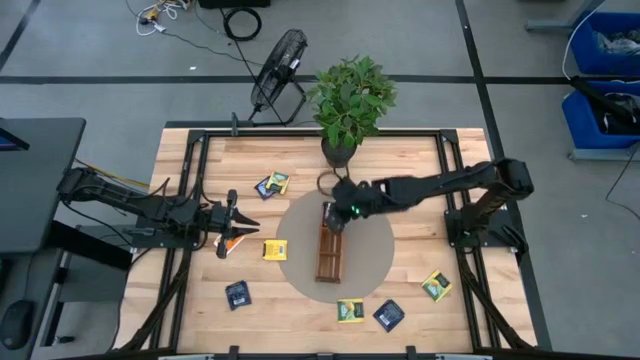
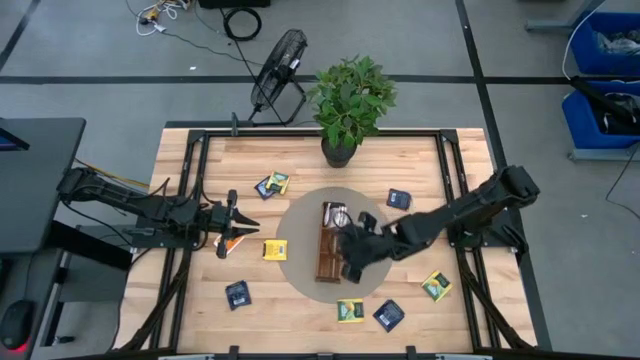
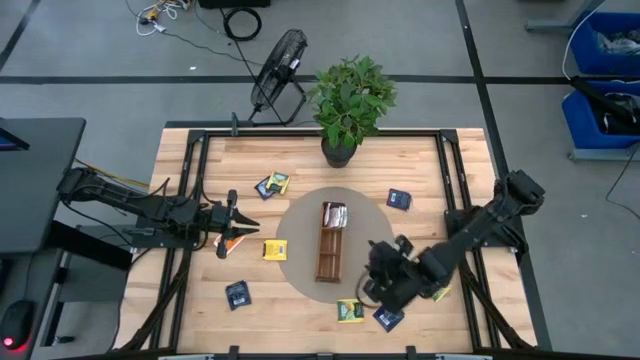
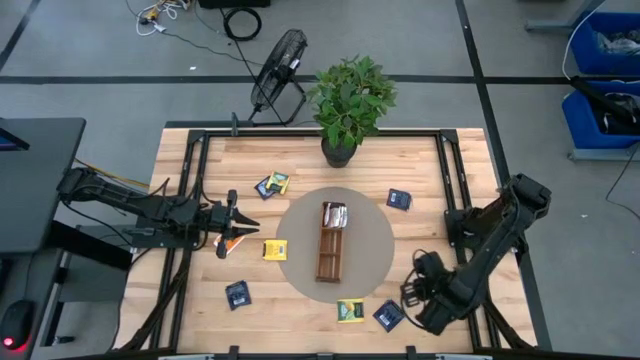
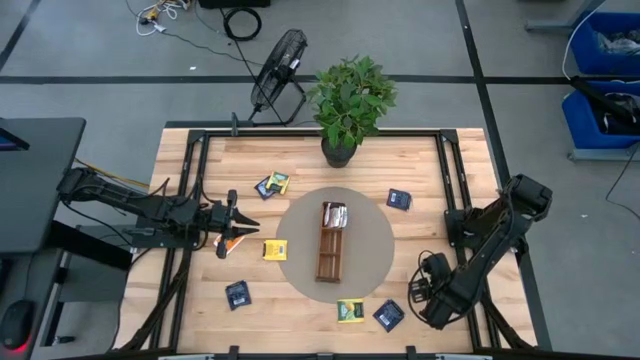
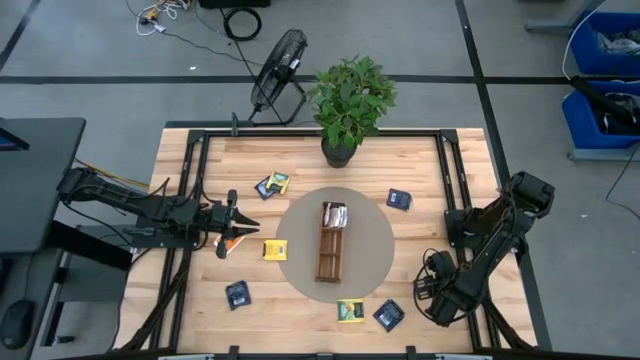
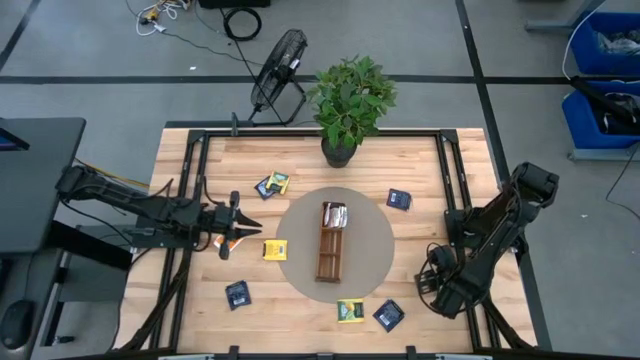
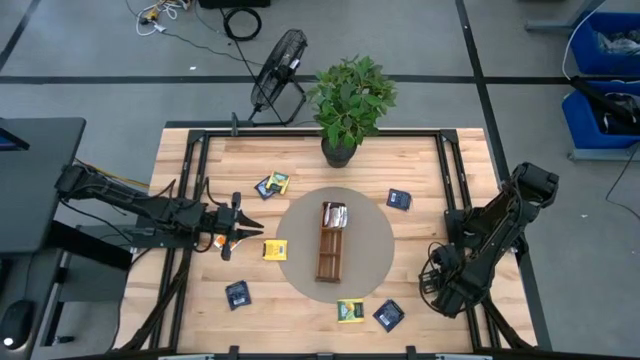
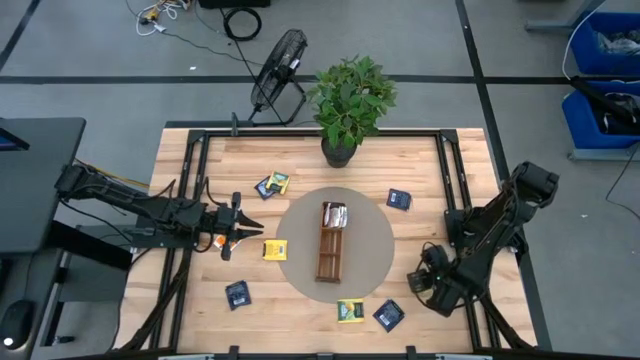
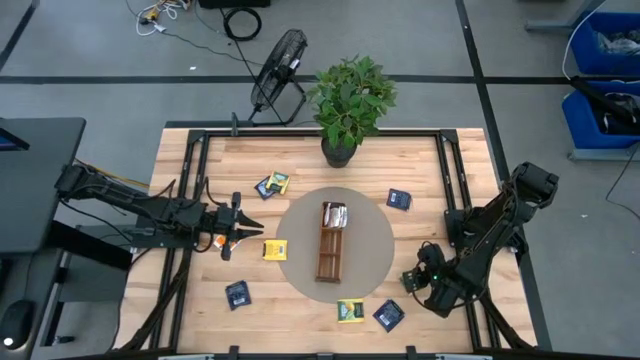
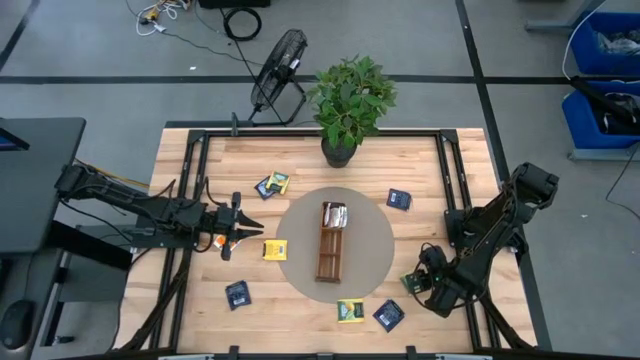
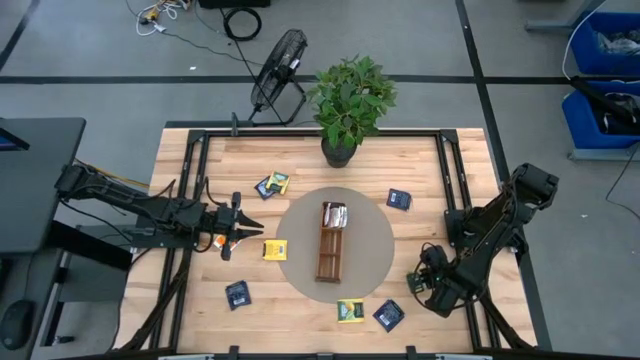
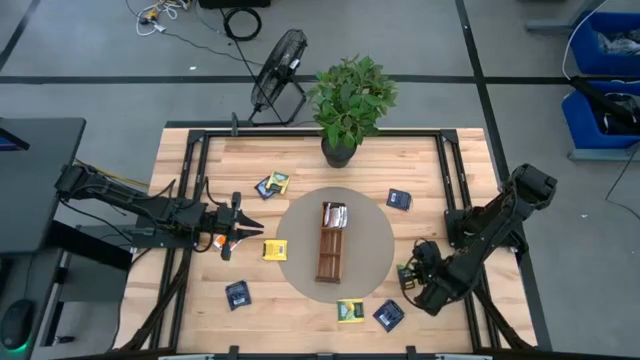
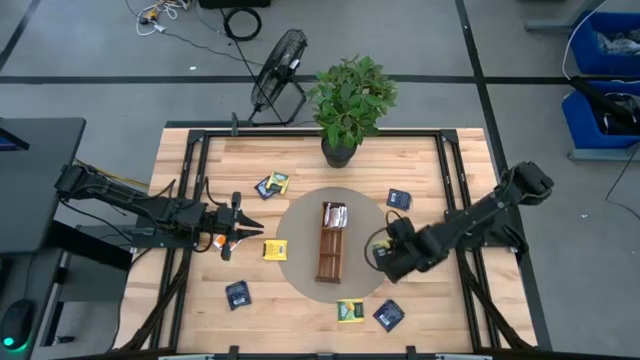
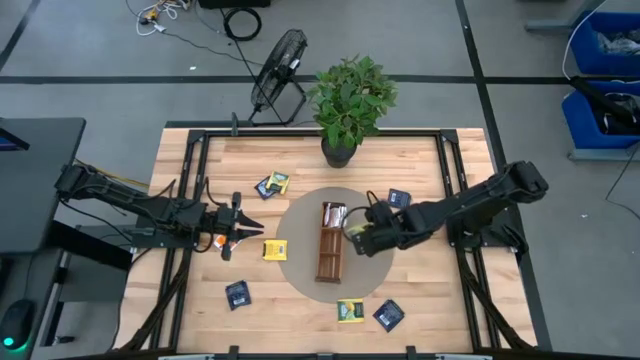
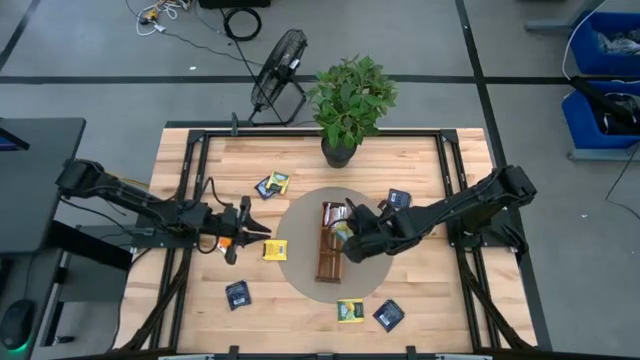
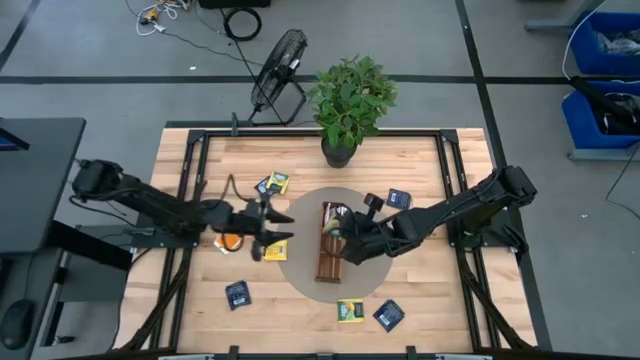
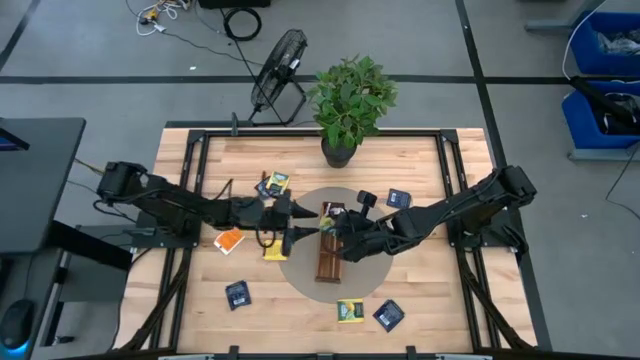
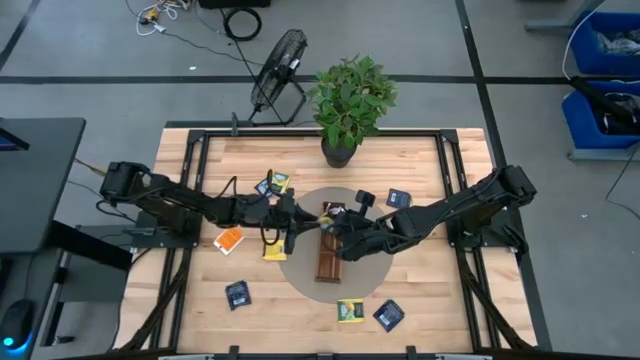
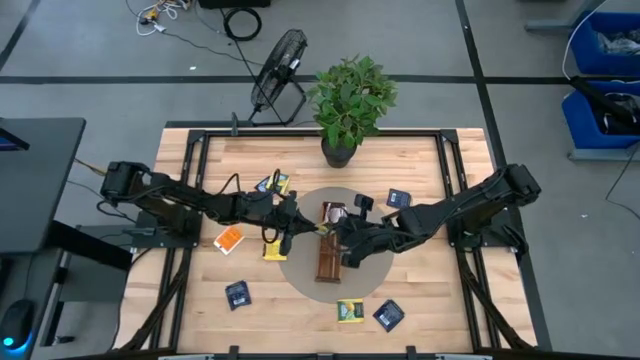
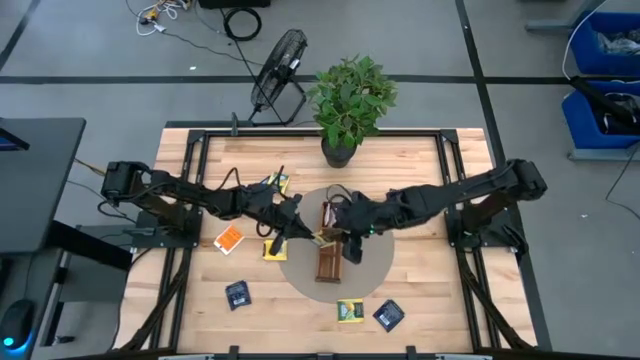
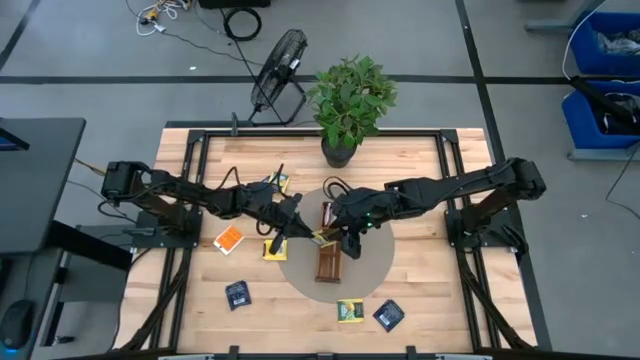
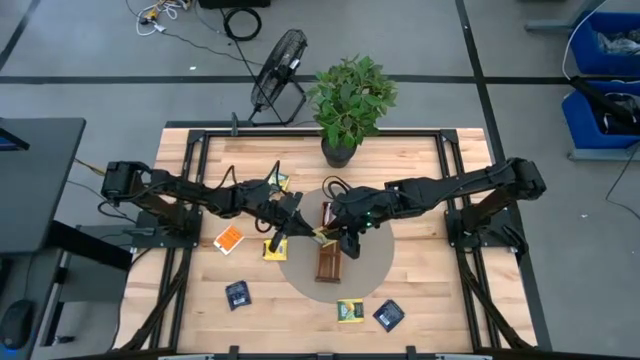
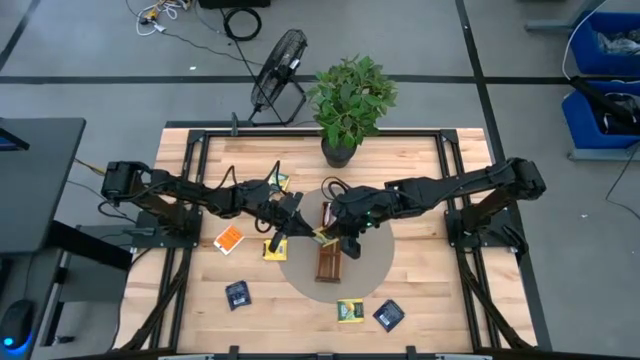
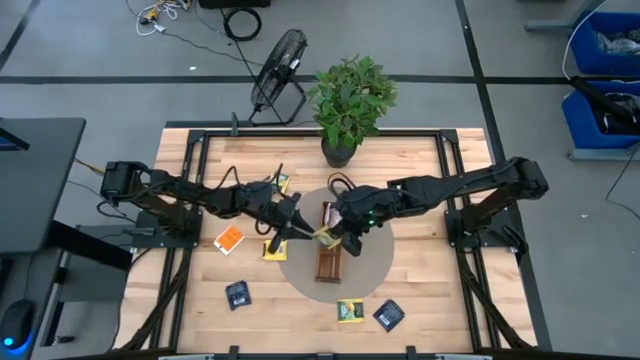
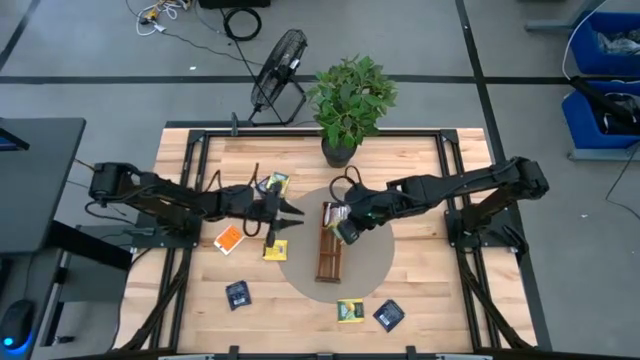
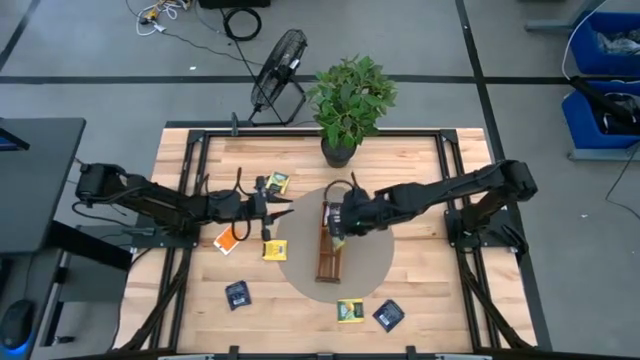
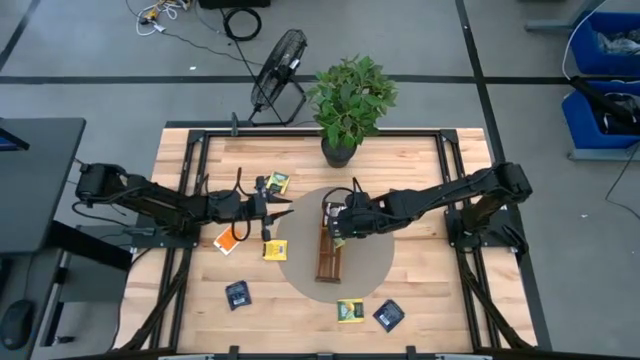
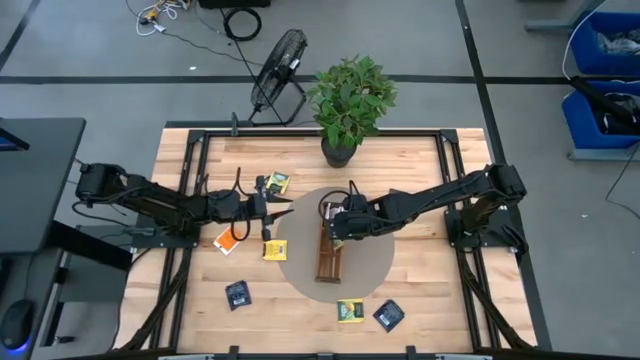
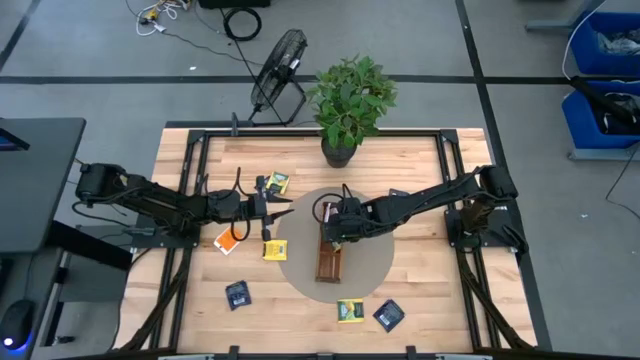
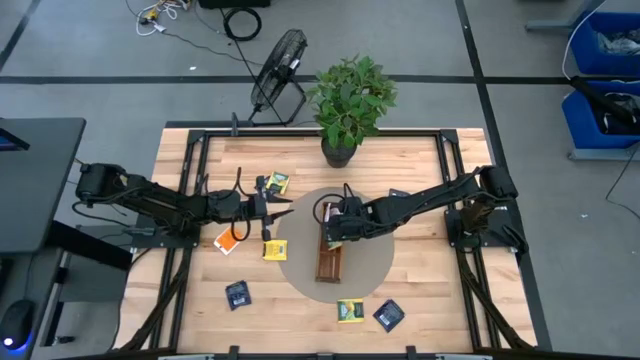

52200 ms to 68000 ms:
Task: Pick & Place Tea
Put the yellow tea bag into the middle compartment of the middle section wooden organizer

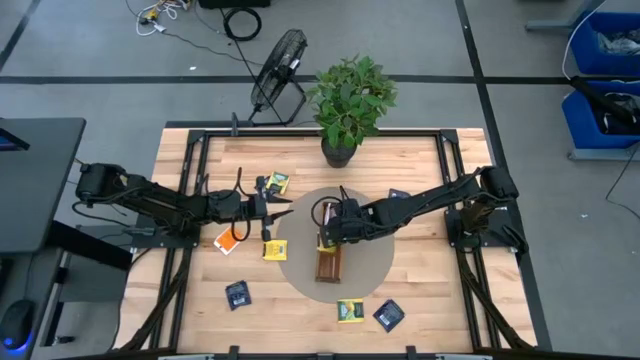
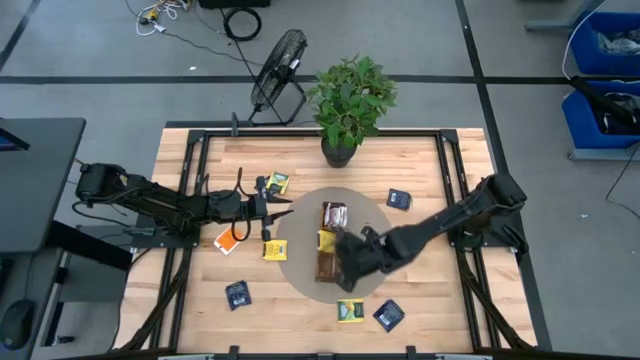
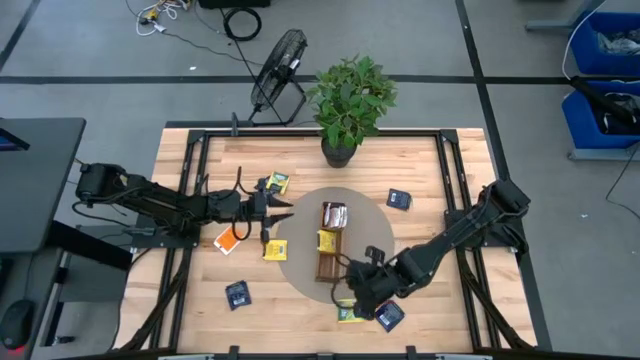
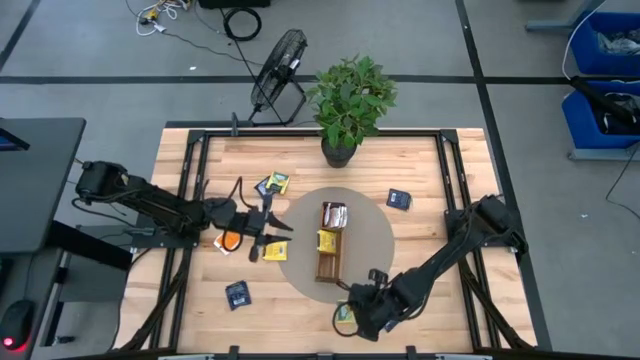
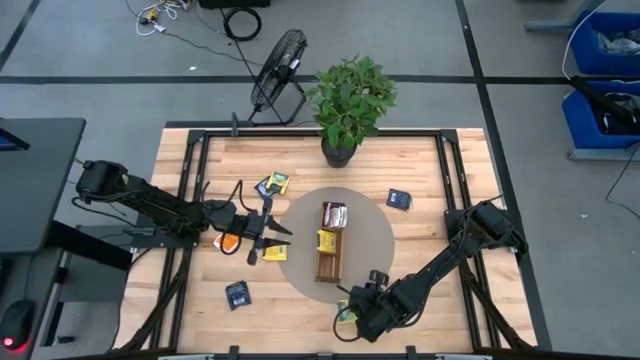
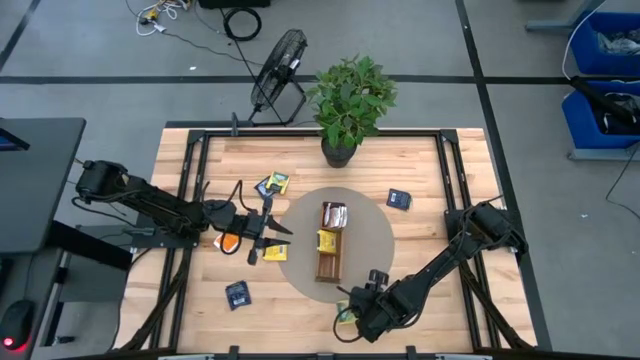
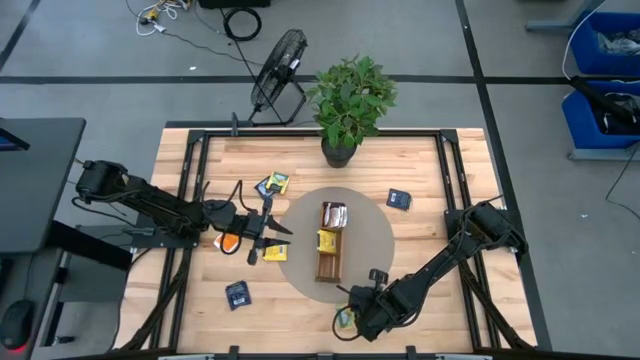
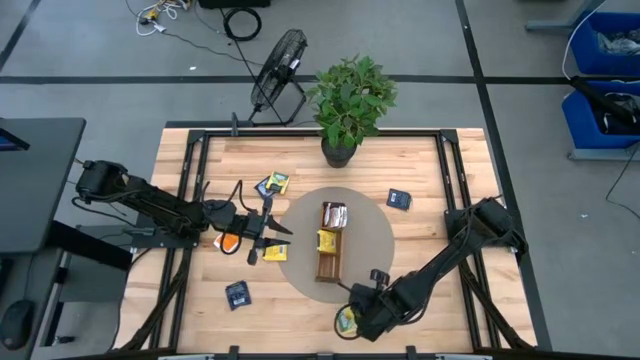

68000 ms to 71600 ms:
Put the yellow tea bag into the middle compartment of the middle section wooden organizer
